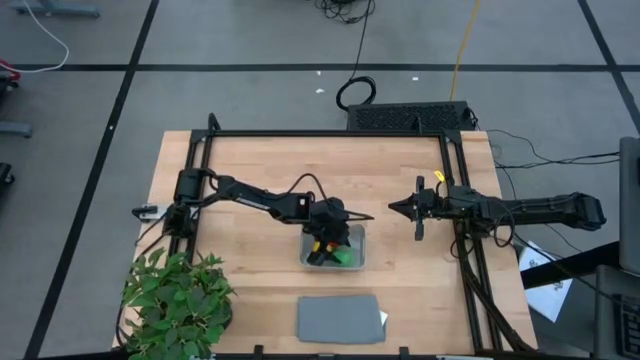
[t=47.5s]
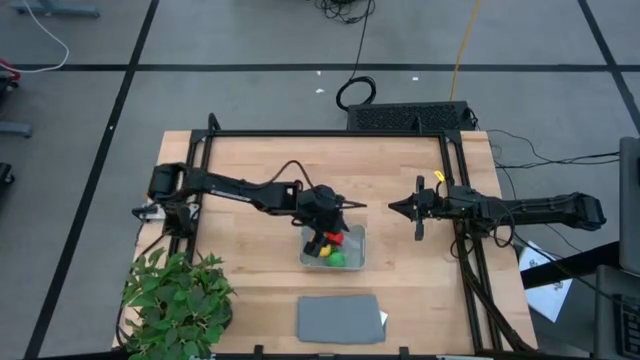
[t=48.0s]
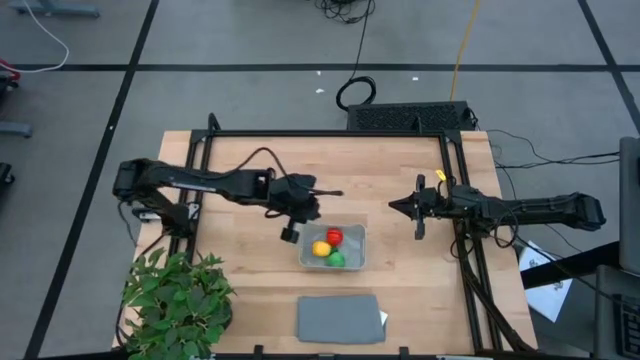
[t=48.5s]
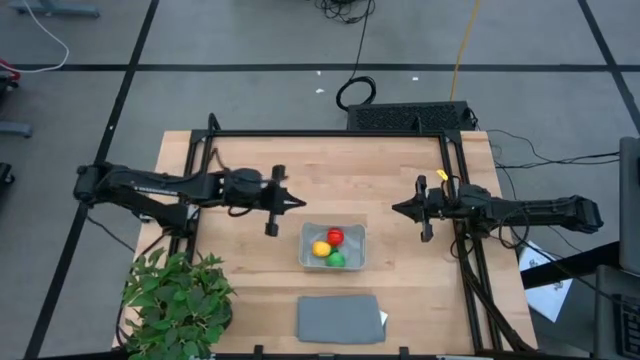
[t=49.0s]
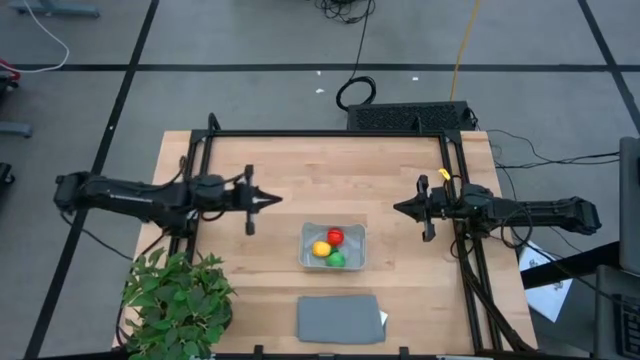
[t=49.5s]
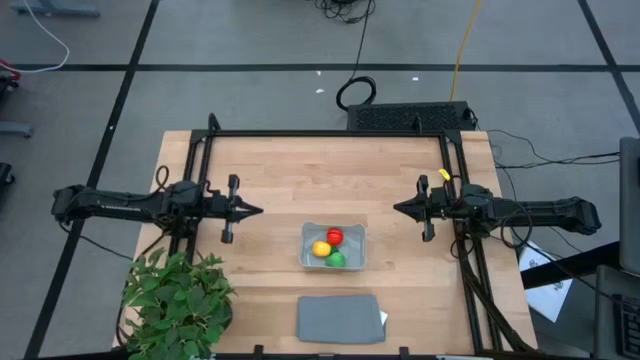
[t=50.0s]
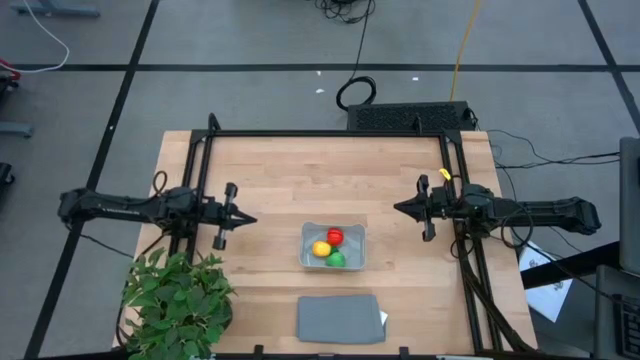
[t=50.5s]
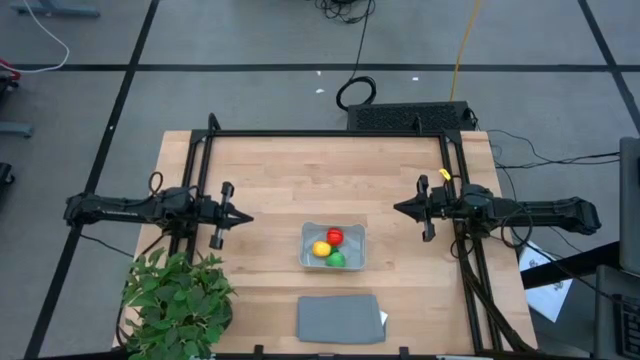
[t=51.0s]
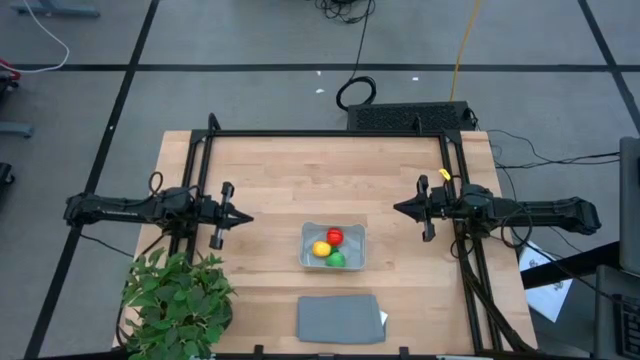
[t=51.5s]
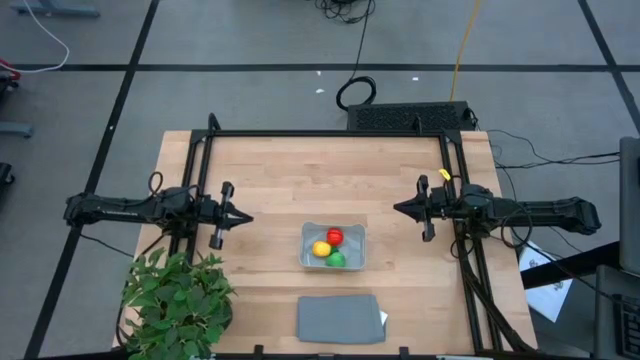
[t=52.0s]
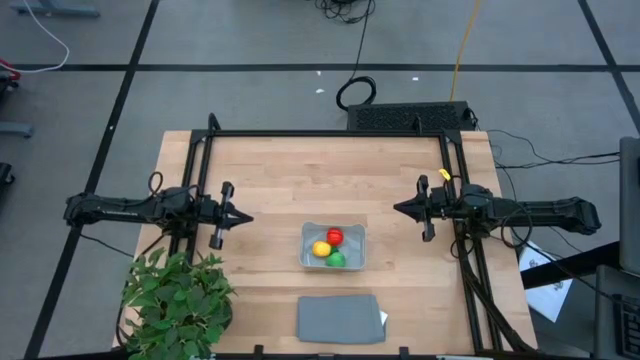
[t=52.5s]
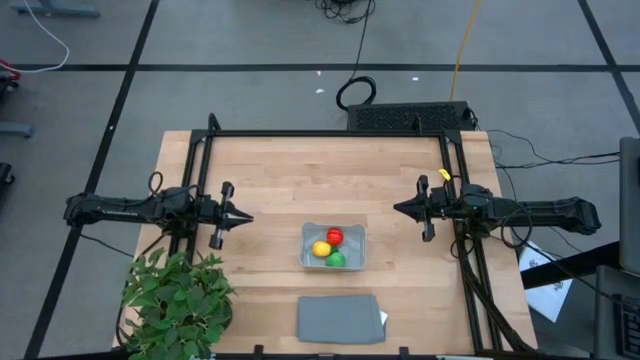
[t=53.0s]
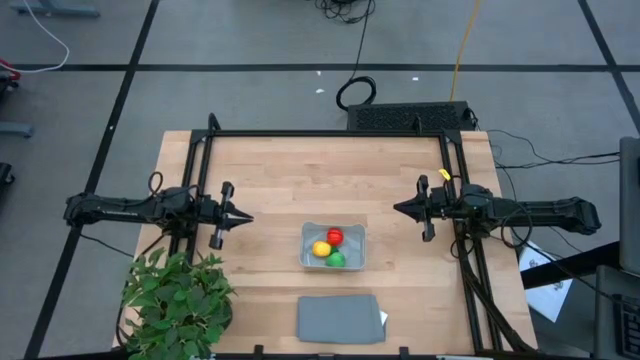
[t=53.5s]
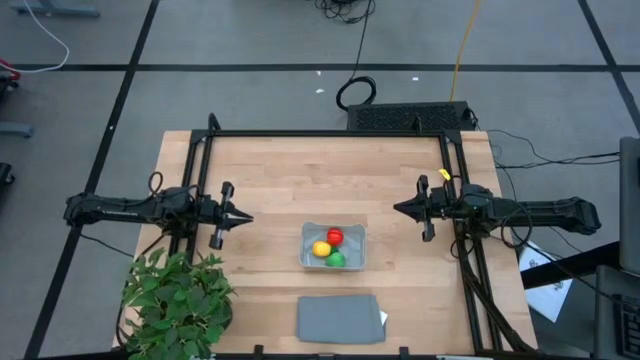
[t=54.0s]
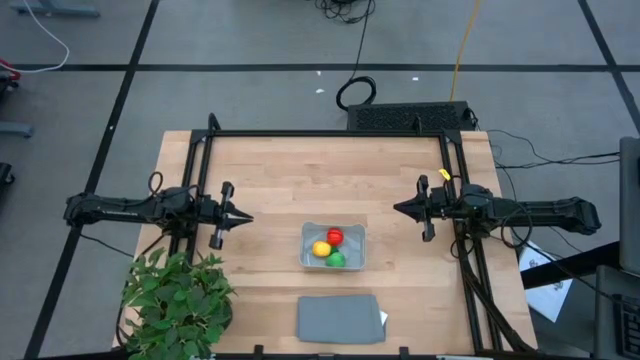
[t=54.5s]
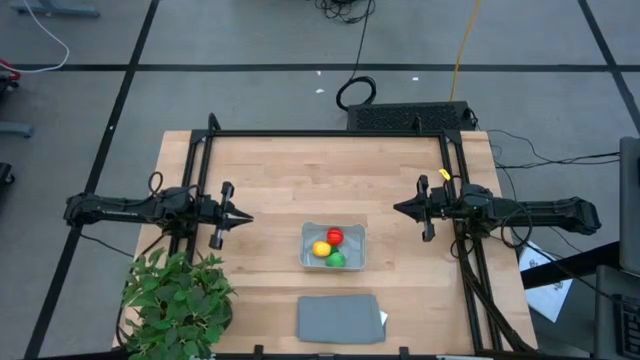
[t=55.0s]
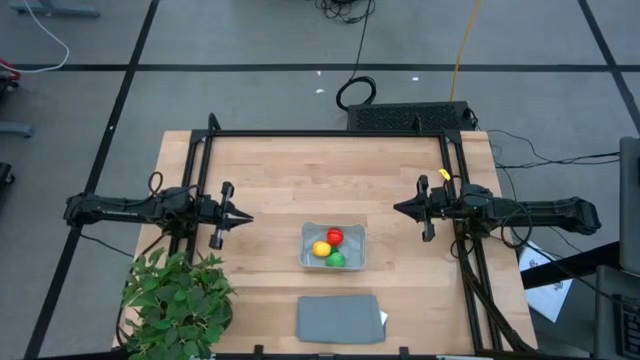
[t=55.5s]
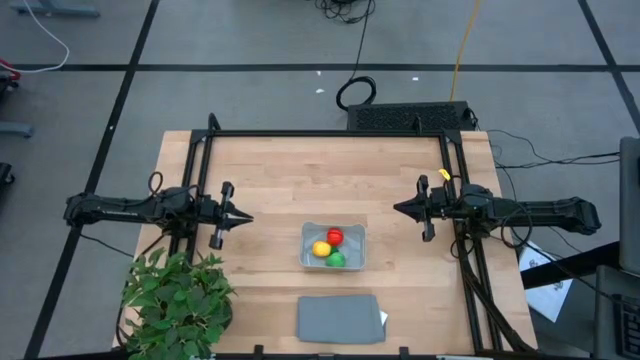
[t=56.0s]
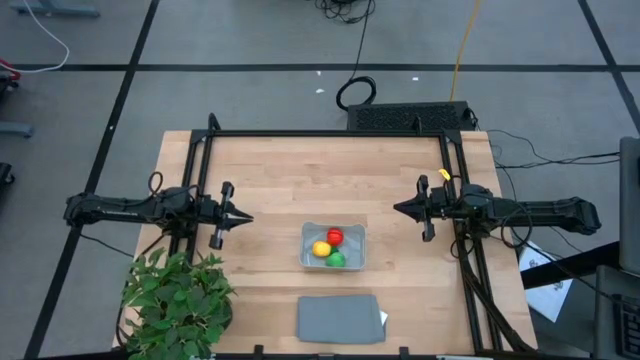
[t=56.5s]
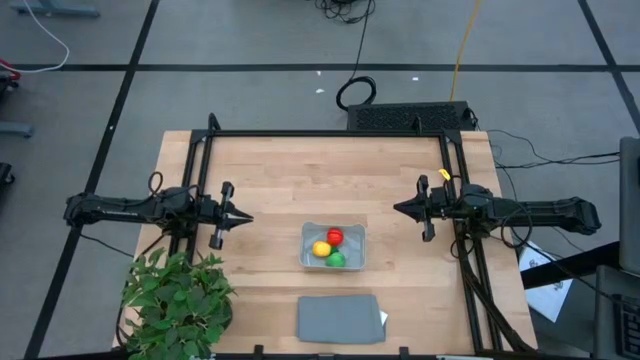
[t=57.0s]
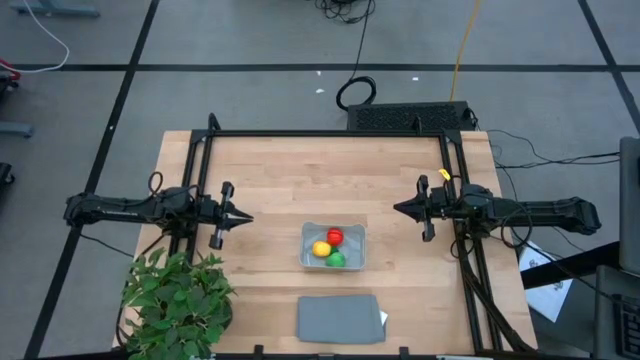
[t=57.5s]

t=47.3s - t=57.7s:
Task: Pick and placing Produce into tupperware
Return to Home Position

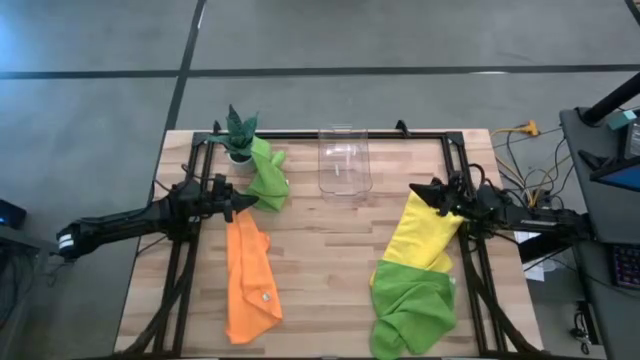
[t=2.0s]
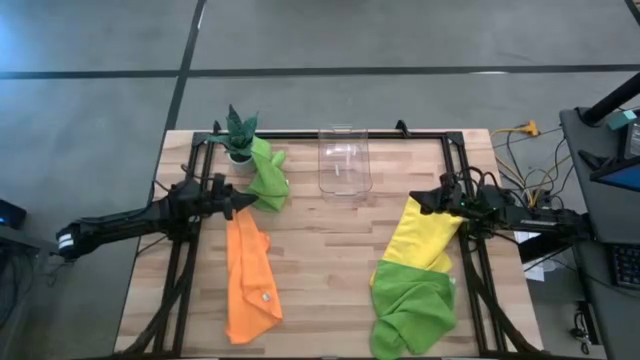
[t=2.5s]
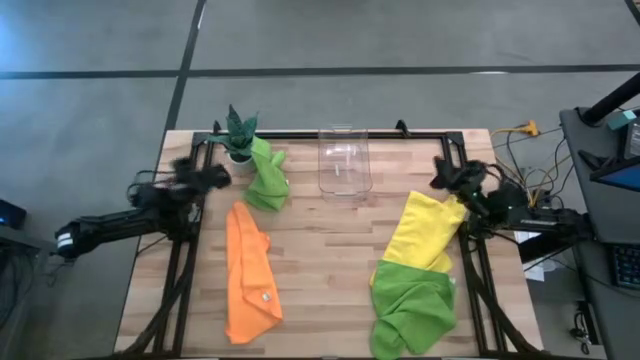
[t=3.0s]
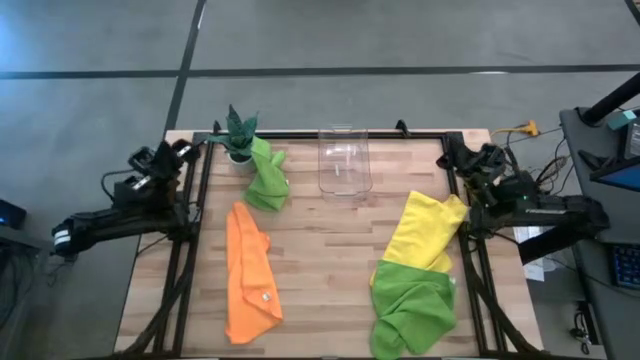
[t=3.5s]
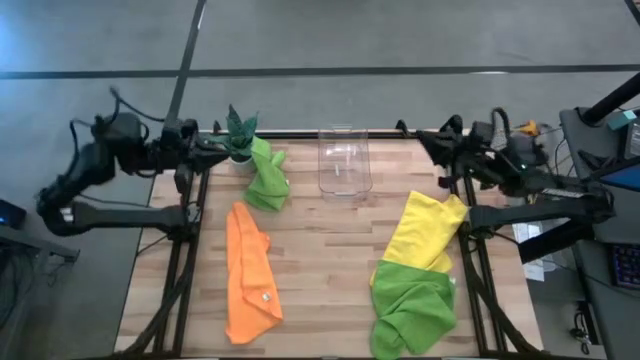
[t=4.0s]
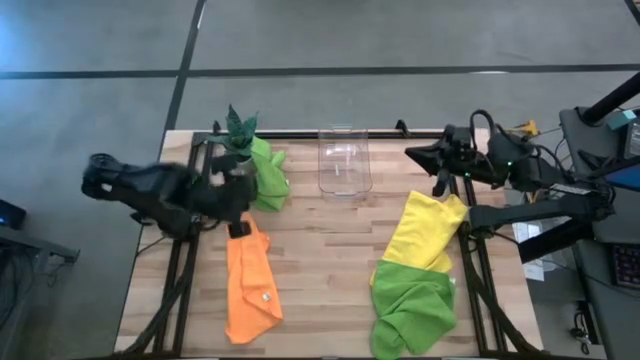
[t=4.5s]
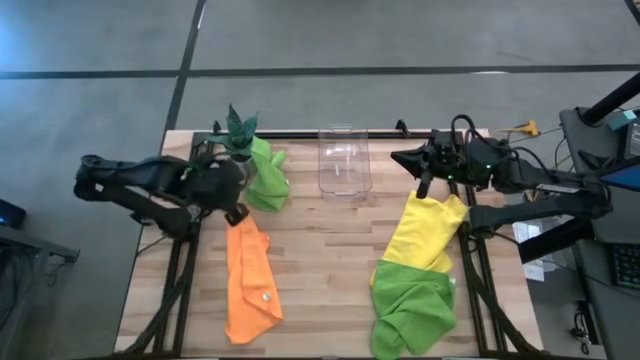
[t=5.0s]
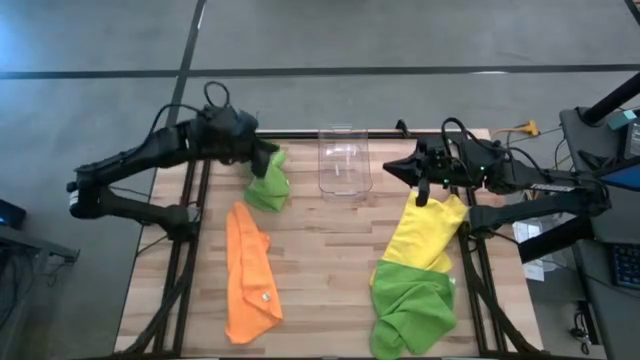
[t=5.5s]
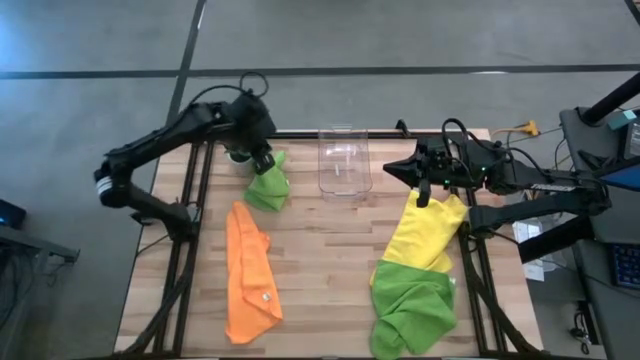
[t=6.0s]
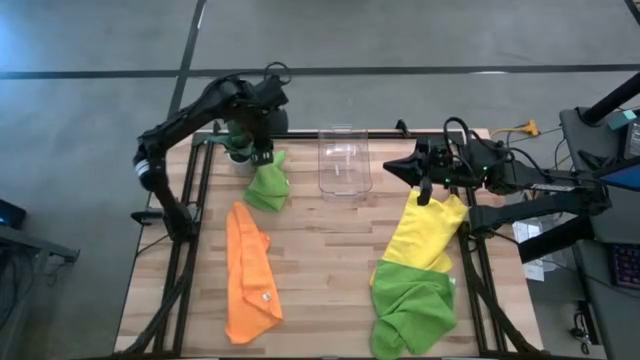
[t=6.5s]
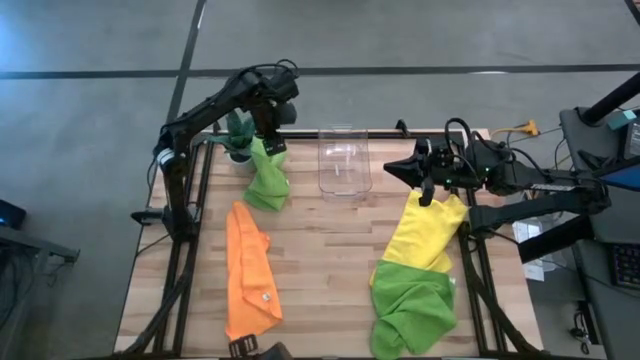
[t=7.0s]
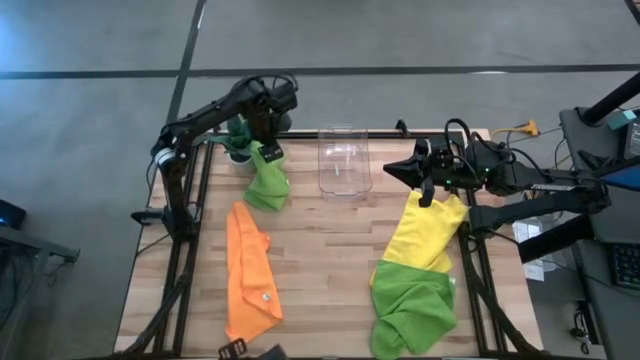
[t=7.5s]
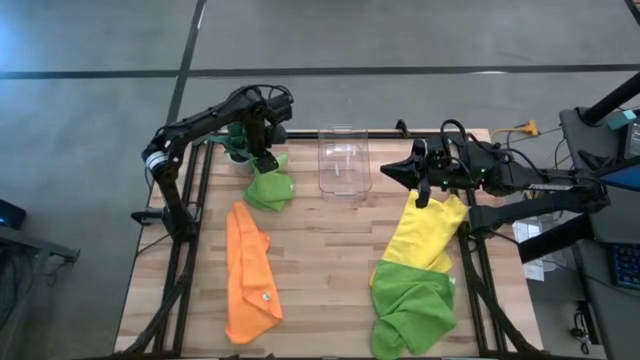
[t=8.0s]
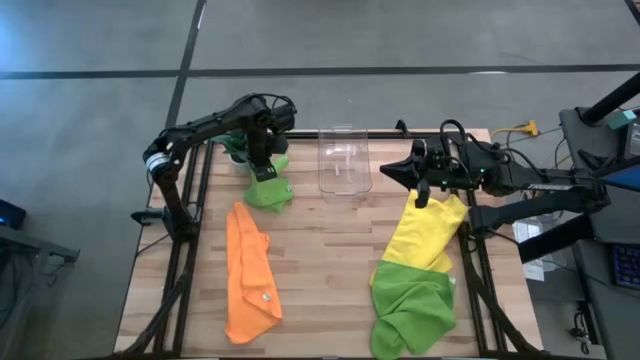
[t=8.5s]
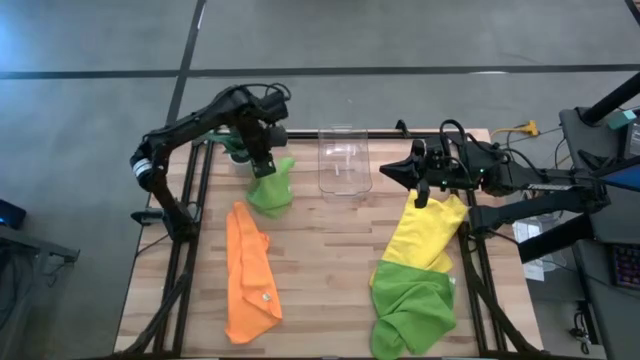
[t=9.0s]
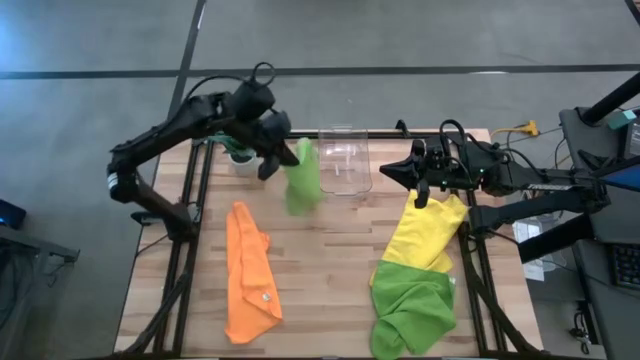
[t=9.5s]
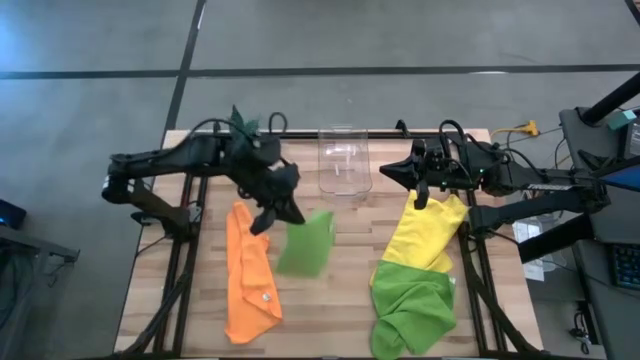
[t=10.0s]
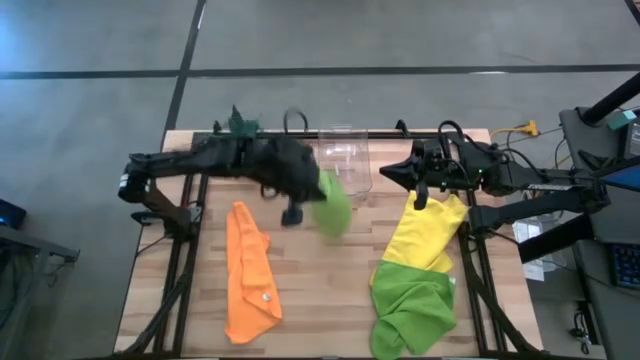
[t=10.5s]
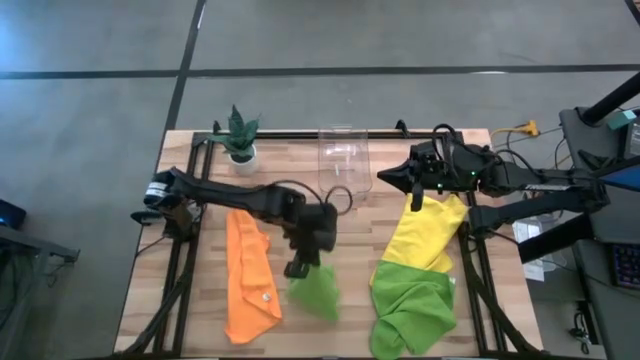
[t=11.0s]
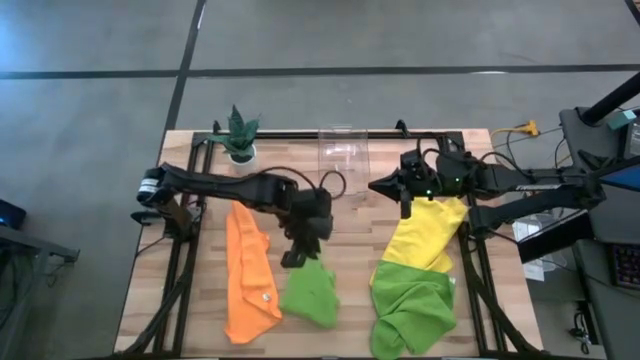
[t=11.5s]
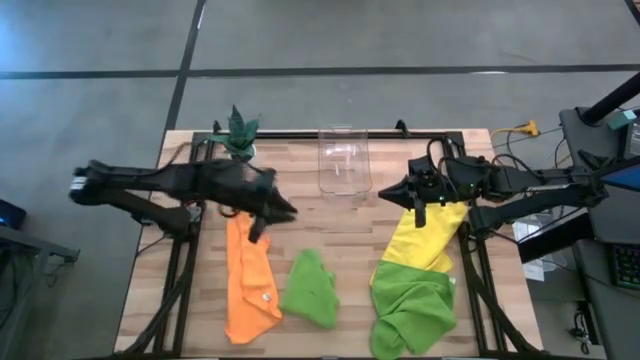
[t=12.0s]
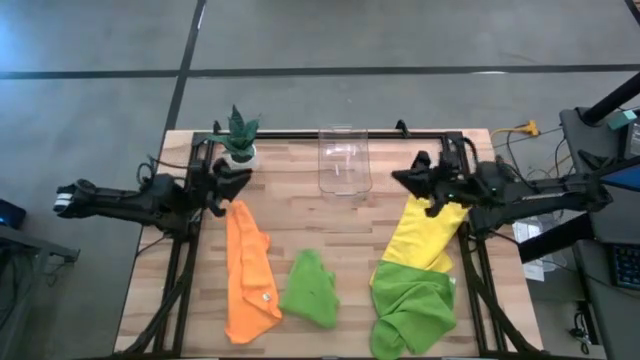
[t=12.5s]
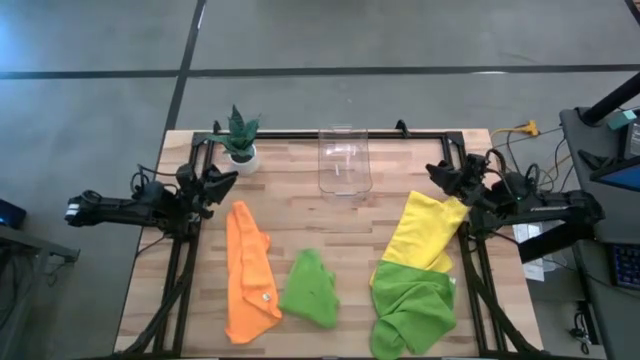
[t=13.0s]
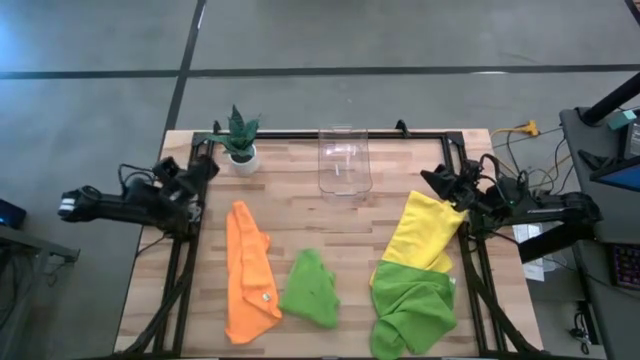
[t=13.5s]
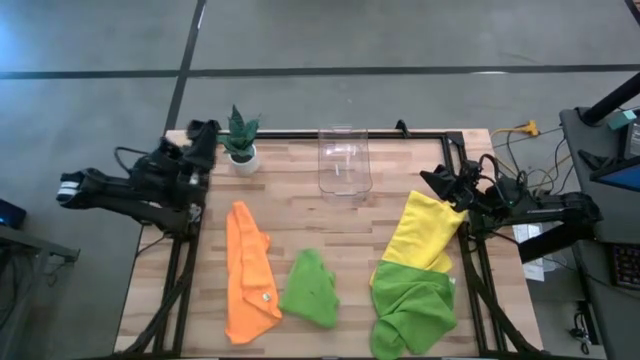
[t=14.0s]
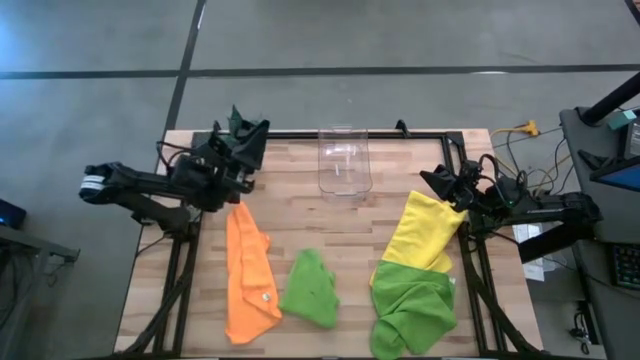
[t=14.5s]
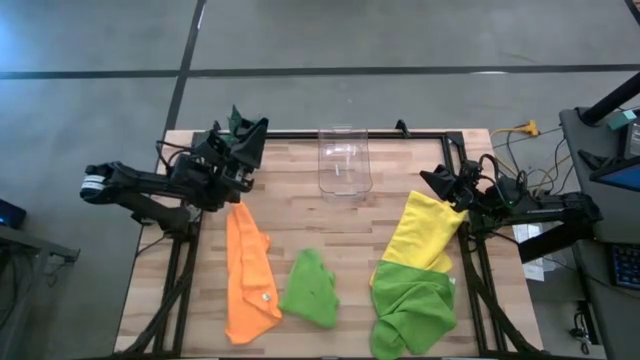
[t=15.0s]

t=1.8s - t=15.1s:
Task: Fold microfiber towels
Move the top green towel to the center
